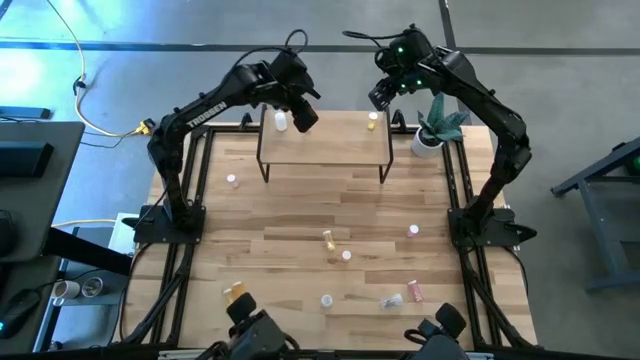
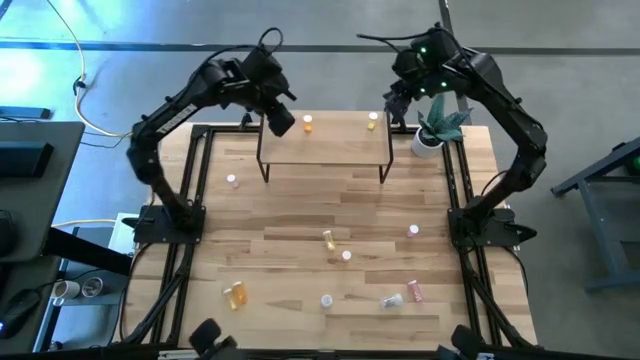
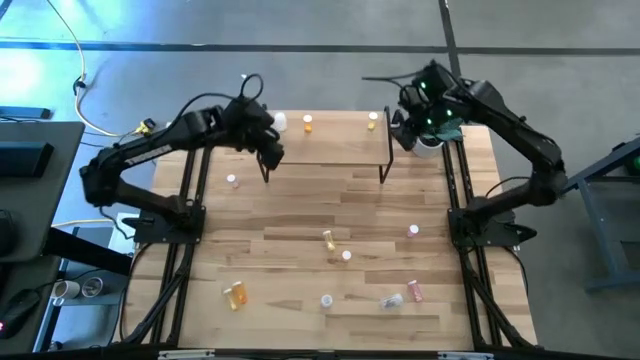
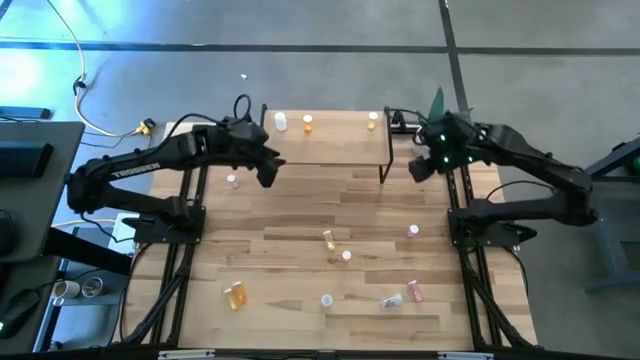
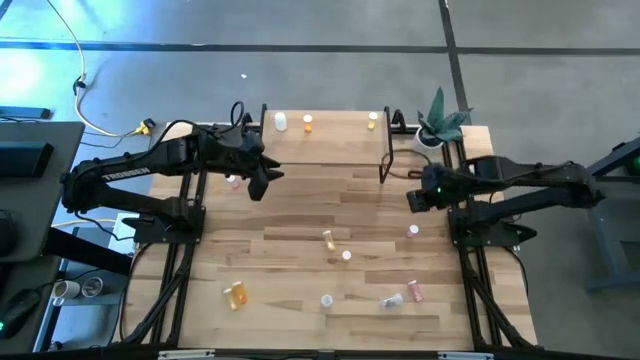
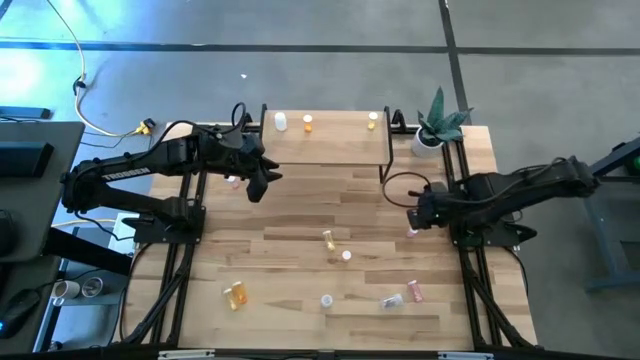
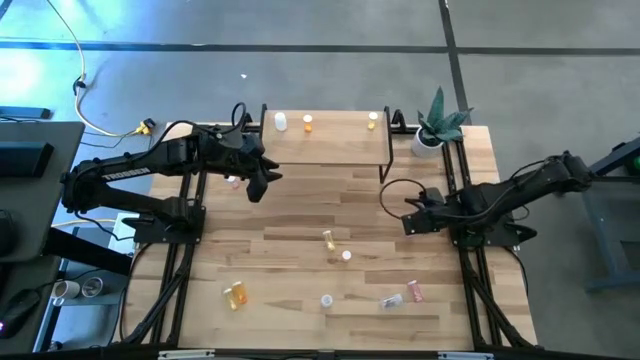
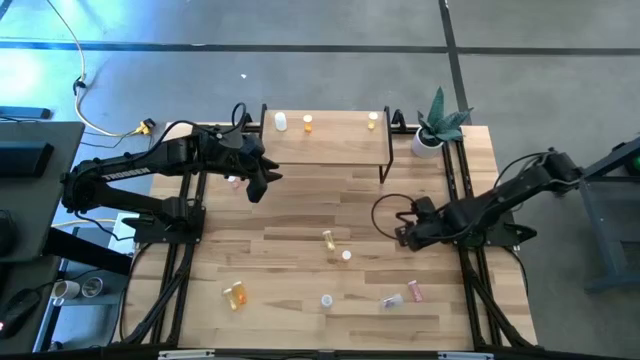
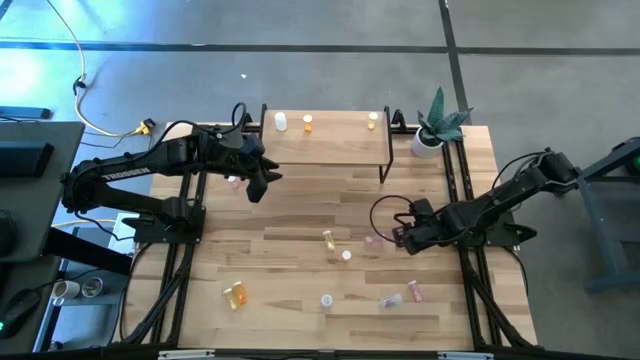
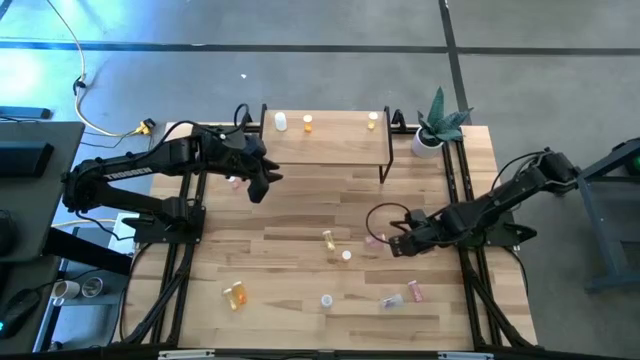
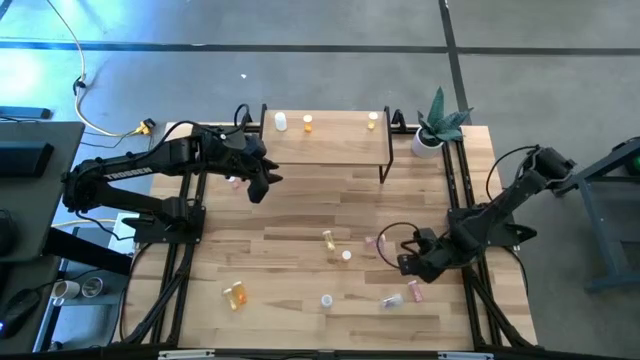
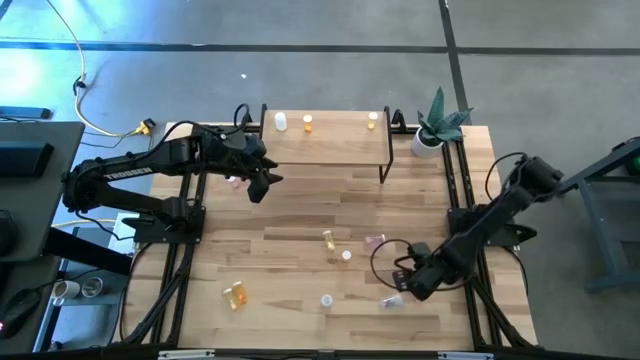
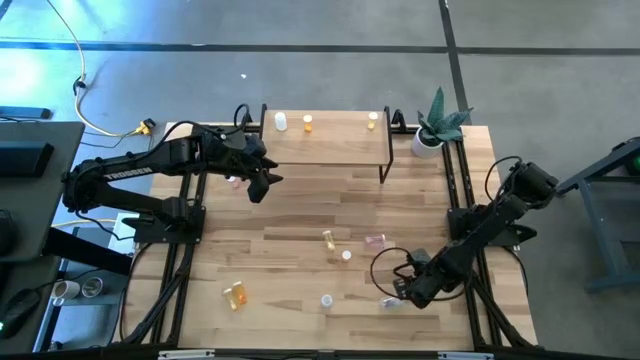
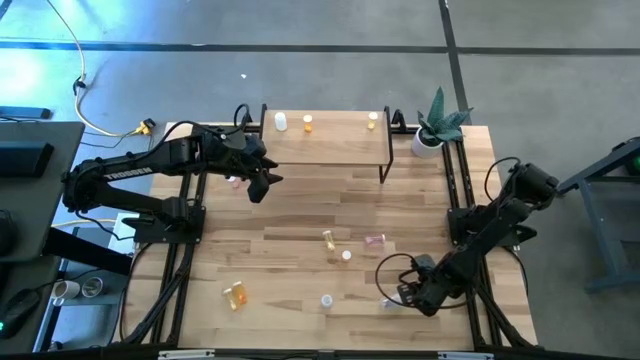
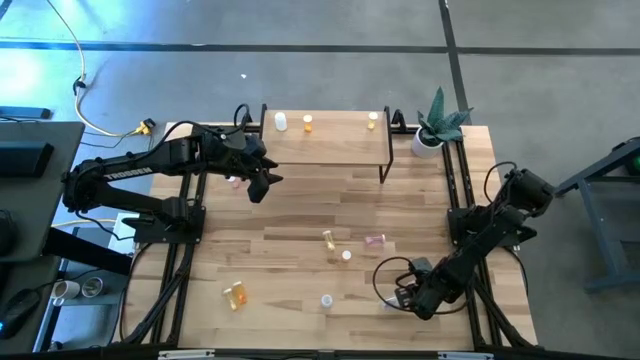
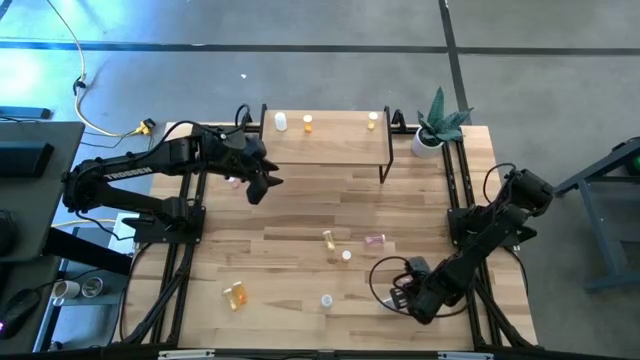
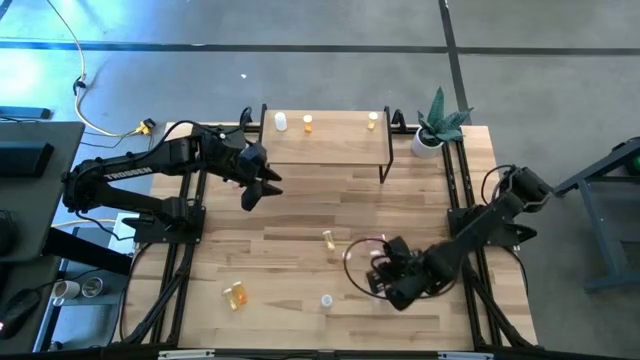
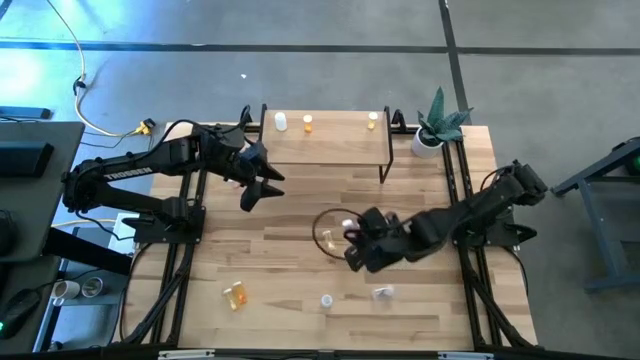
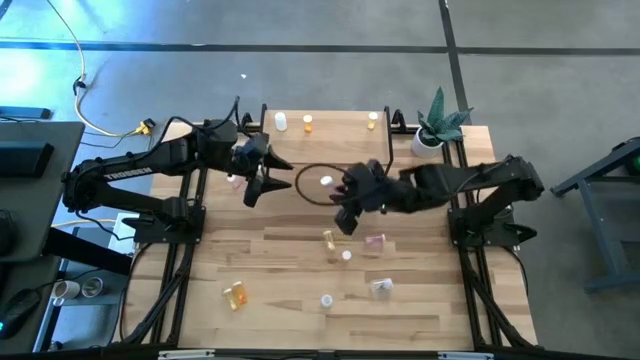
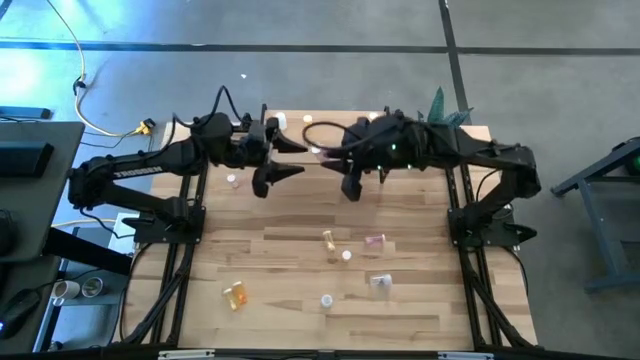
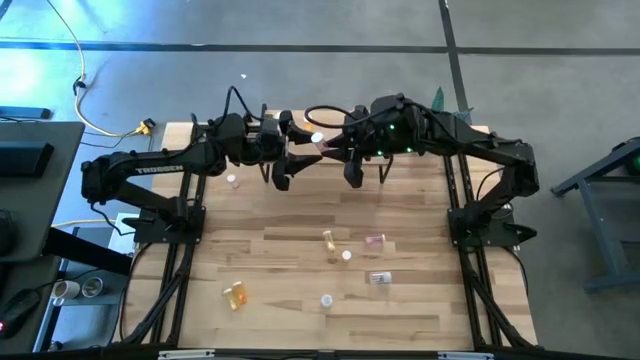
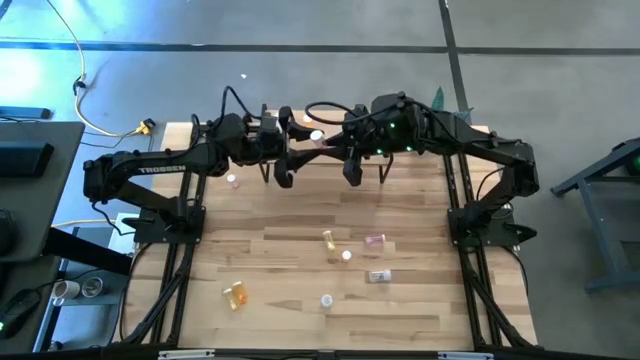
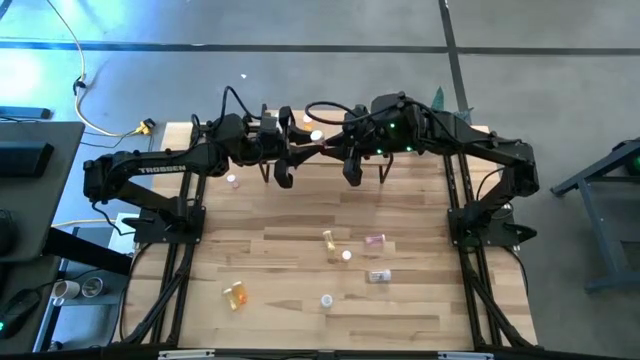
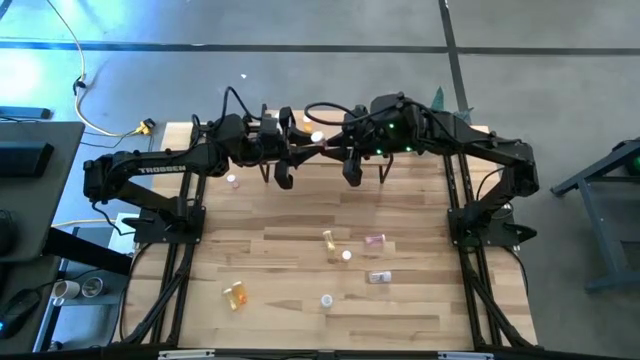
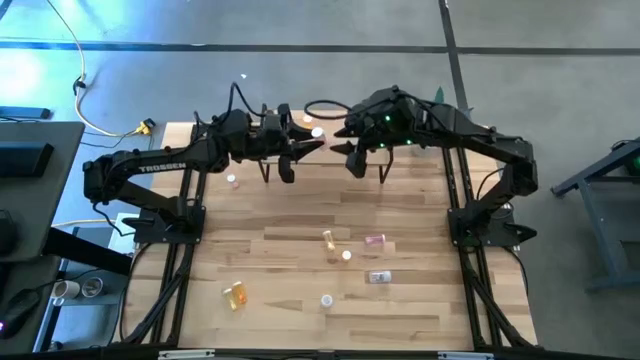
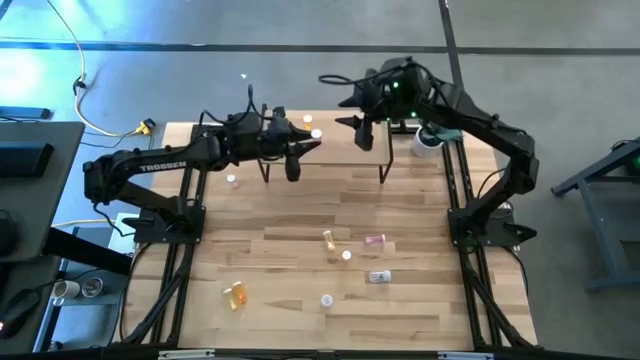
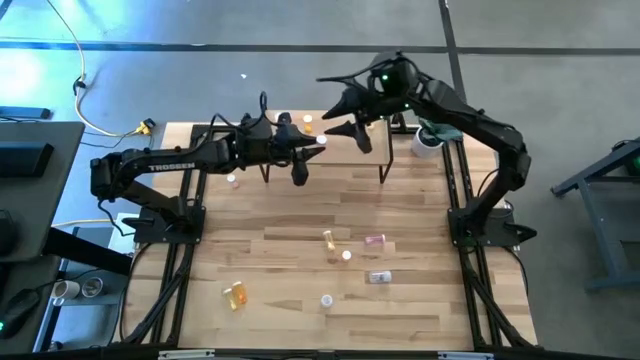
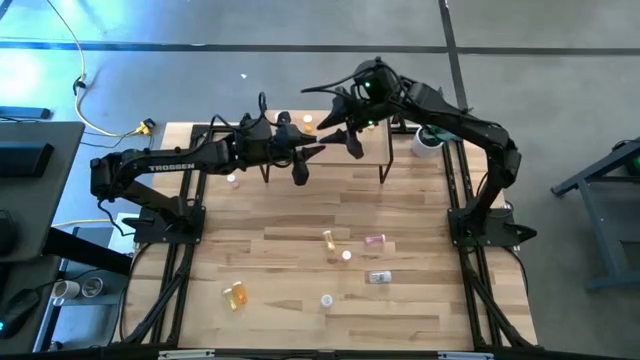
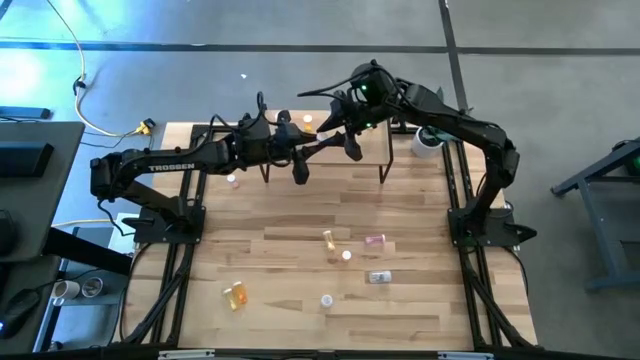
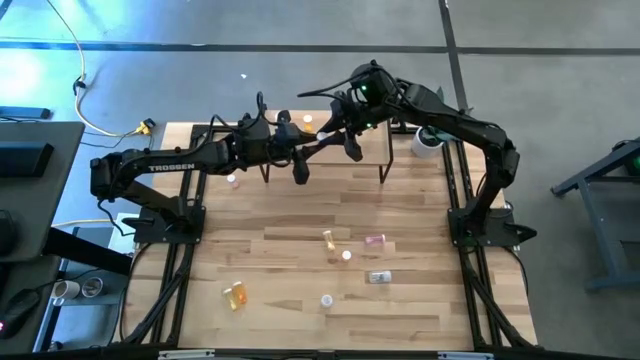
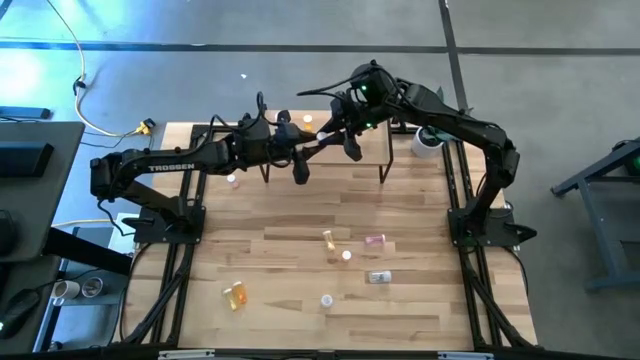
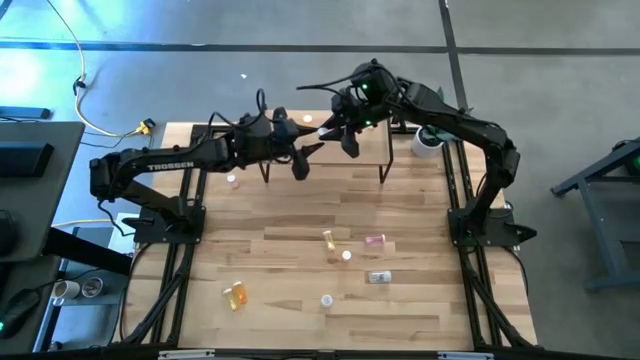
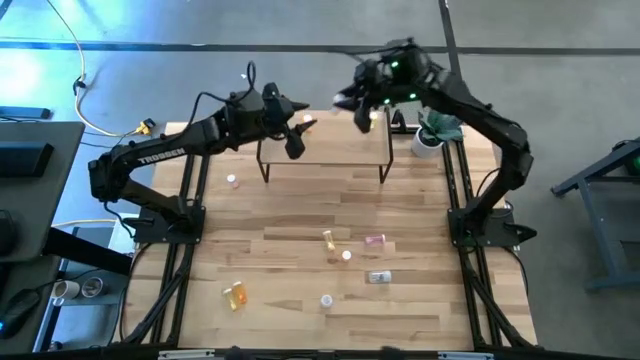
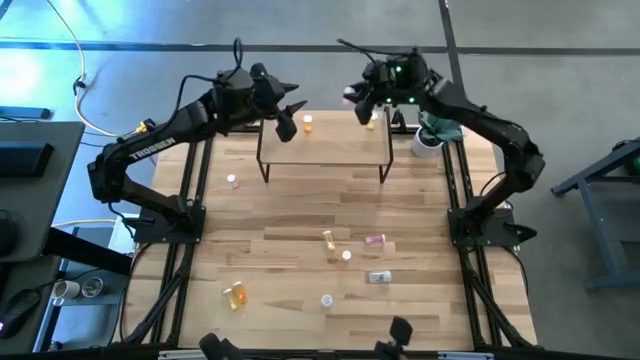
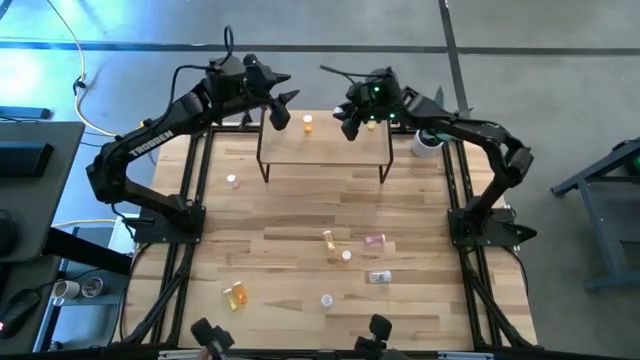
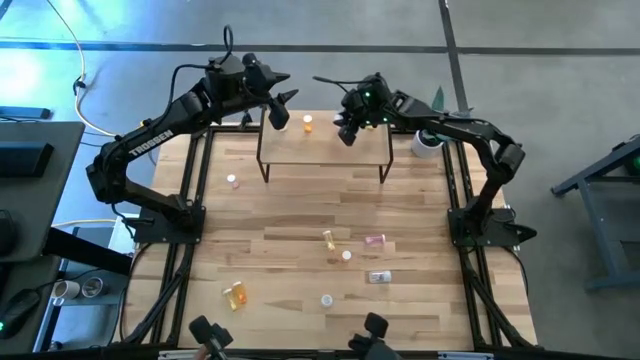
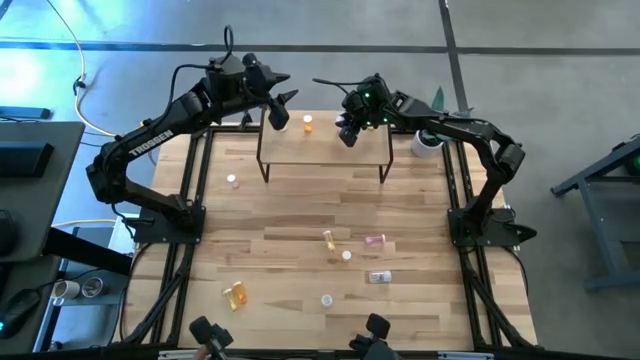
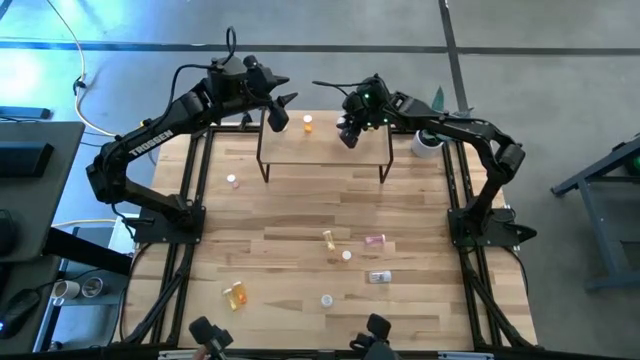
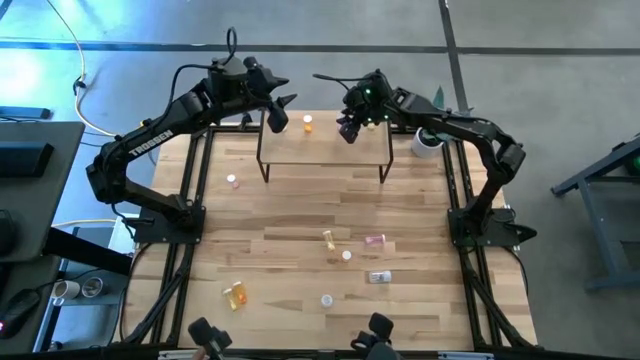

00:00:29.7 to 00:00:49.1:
Task: Pick and place medicine bottles onto shelf by color
Put the bottom right pink pill bottle on the shelf
